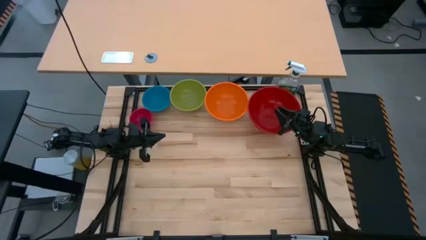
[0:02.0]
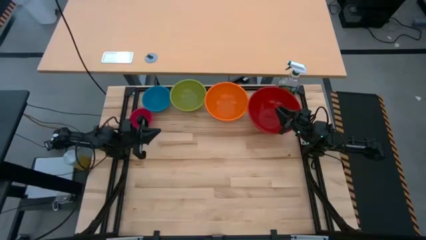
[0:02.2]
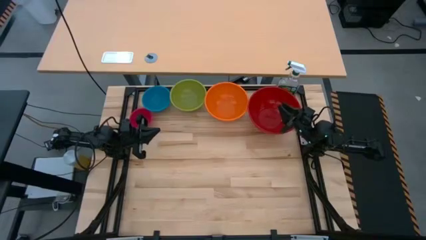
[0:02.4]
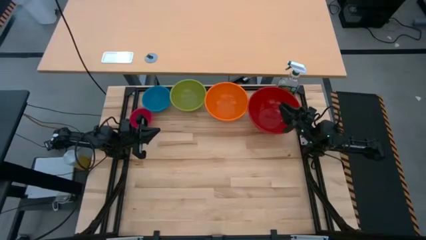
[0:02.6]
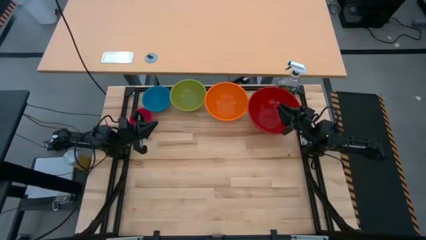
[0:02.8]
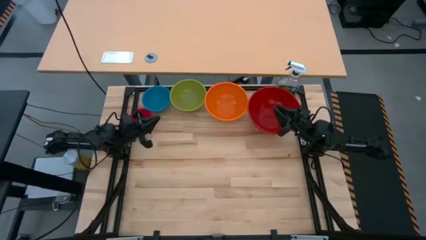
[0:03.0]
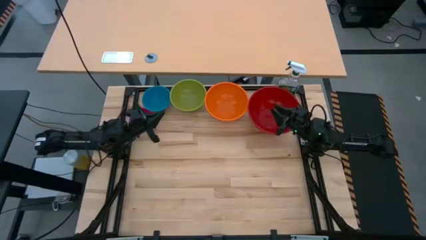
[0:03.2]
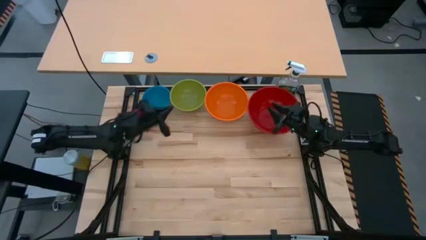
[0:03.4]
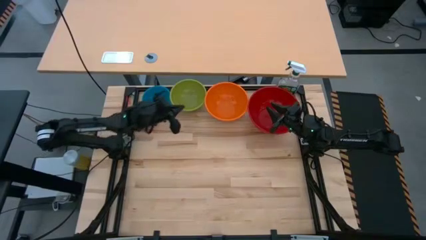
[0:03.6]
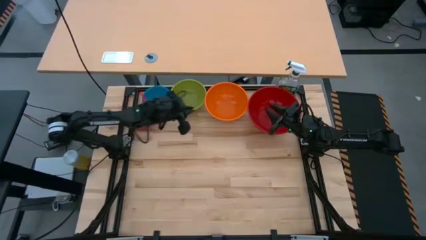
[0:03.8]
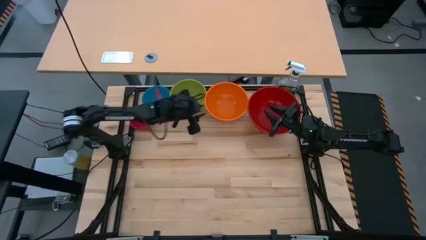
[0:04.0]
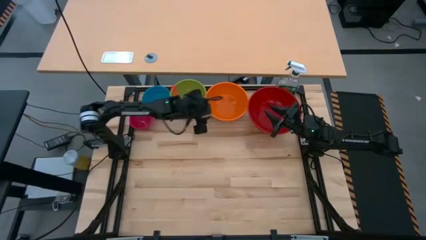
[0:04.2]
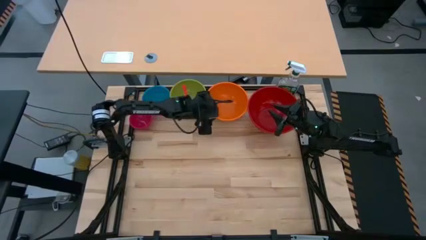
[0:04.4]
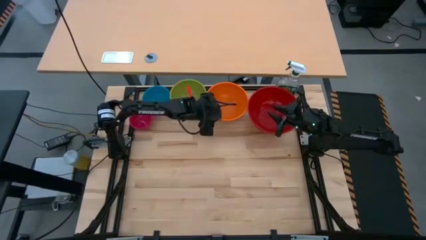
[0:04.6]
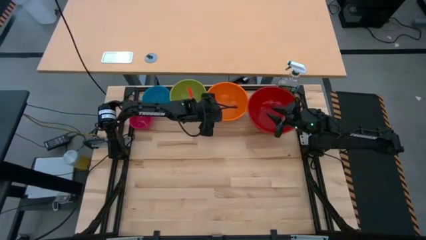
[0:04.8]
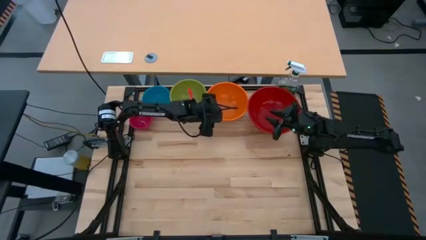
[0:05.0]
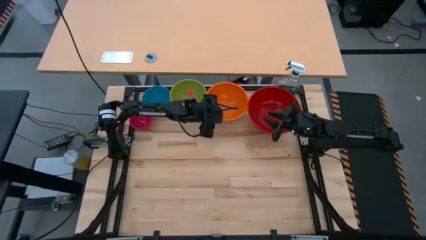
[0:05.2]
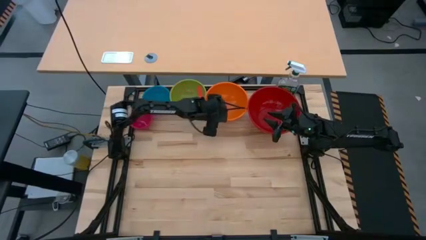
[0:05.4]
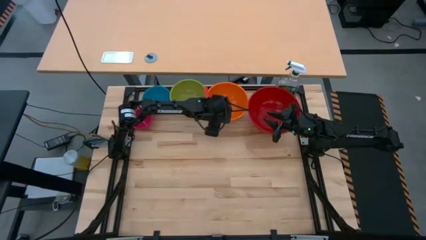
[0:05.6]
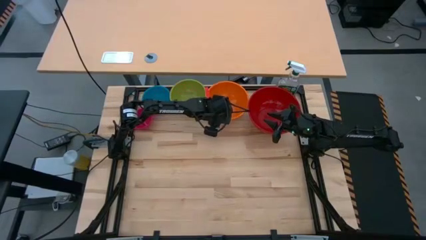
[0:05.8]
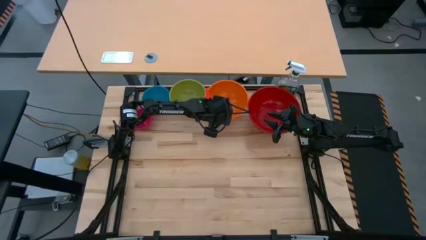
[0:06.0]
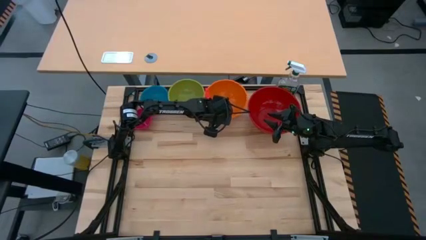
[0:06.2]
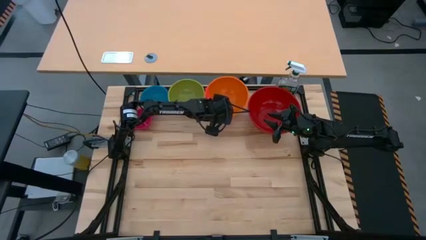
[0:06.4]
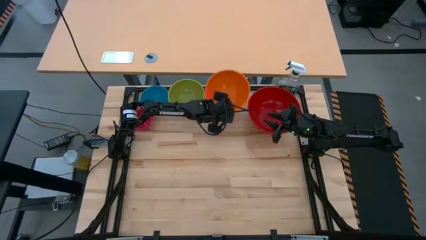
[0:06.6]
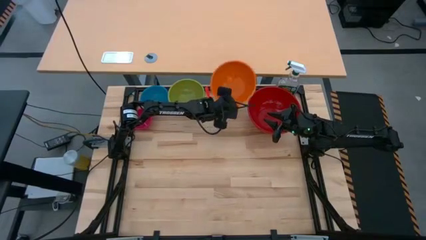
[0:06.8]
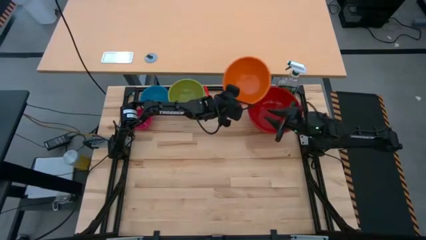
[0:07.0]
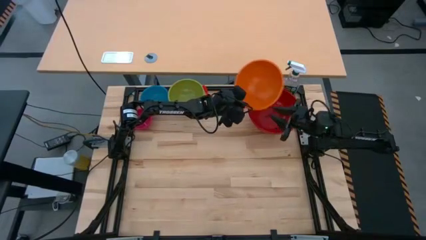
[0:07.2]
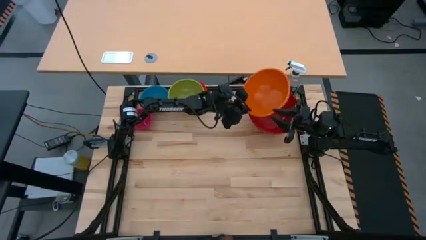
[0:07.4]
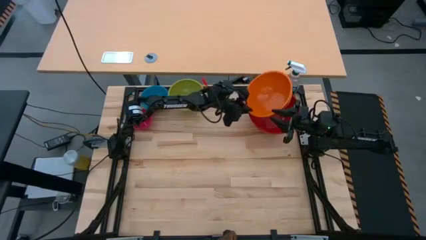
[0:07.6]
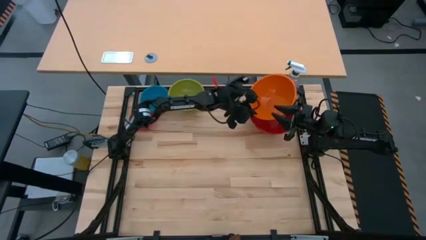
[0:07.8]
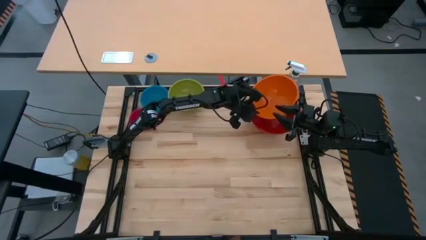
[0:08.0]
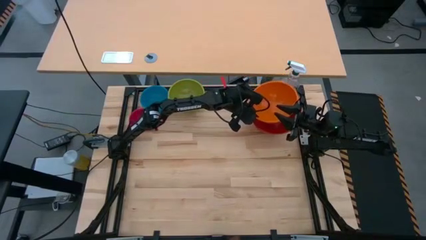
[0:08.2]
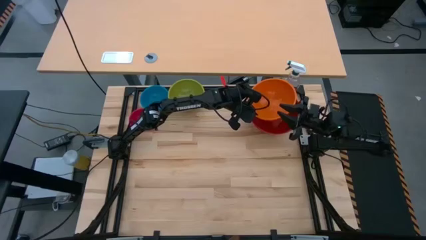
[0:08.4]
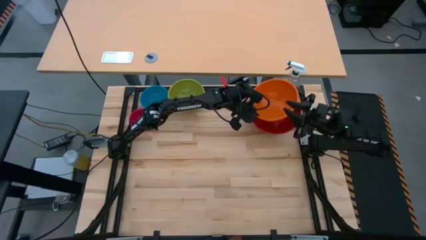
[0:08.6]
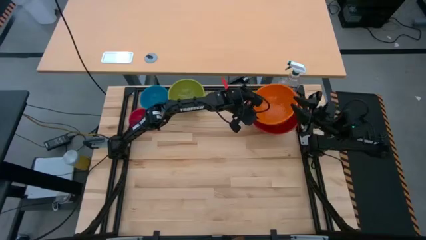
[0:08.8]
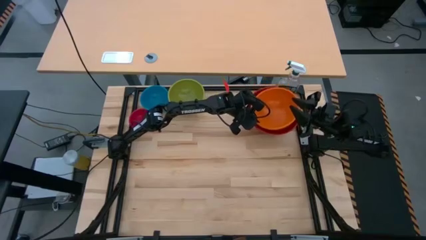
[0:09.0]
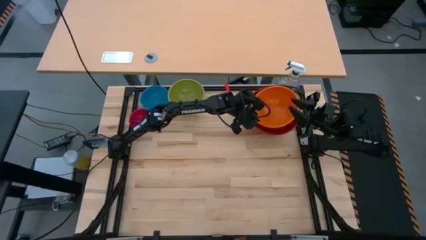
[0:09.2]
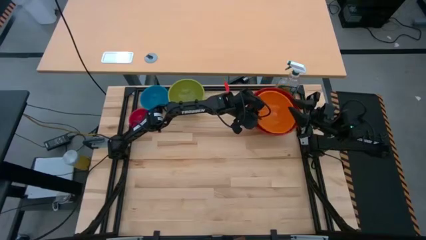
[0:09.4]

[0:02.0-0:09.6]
Stack the orange bowl into the red bowl

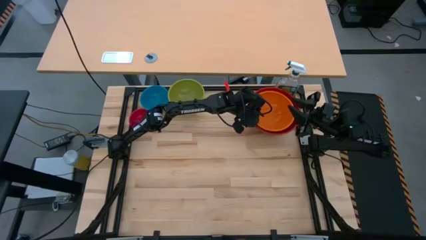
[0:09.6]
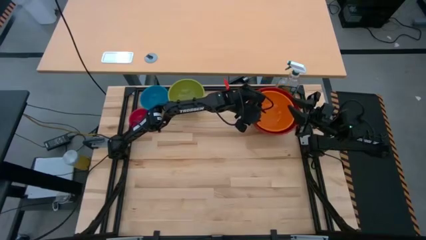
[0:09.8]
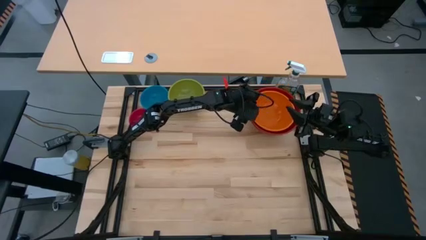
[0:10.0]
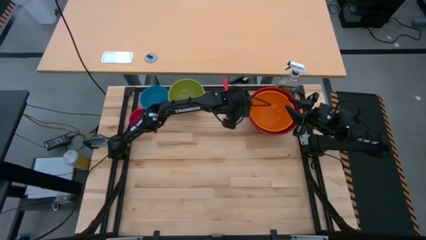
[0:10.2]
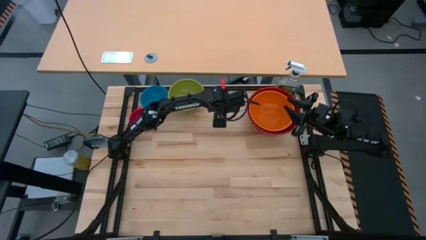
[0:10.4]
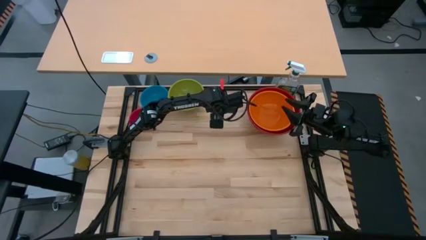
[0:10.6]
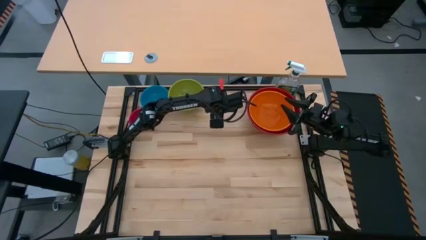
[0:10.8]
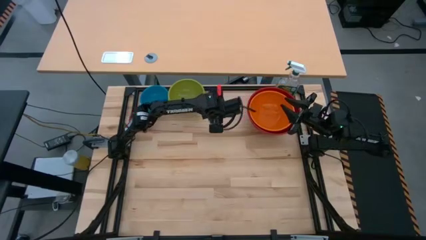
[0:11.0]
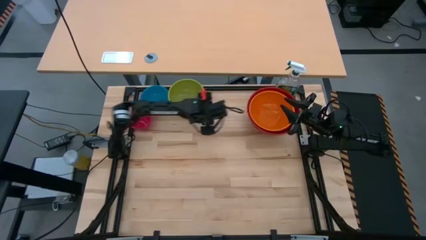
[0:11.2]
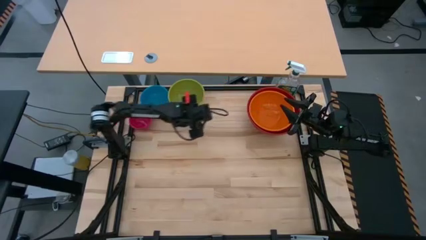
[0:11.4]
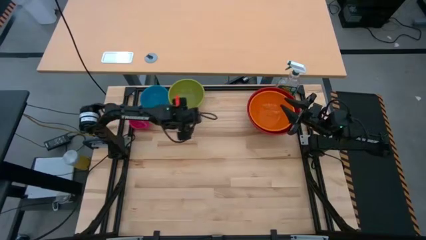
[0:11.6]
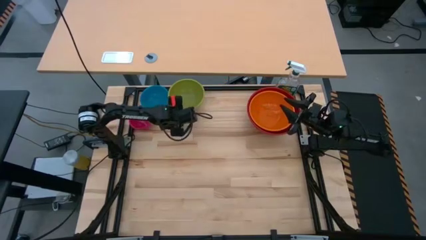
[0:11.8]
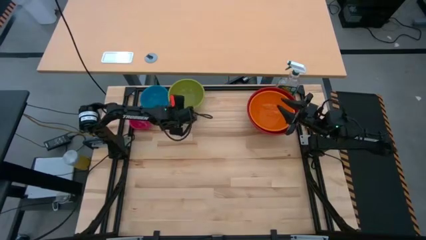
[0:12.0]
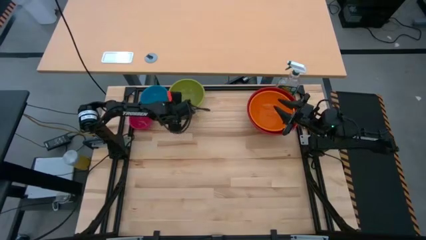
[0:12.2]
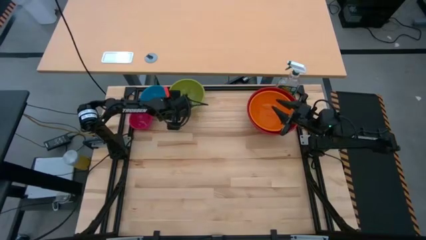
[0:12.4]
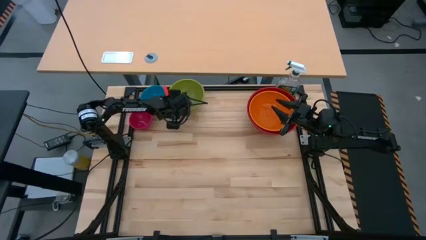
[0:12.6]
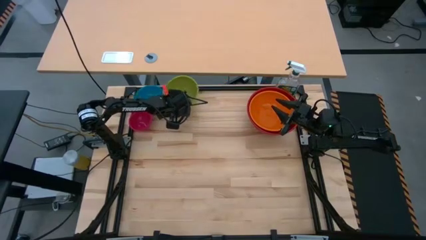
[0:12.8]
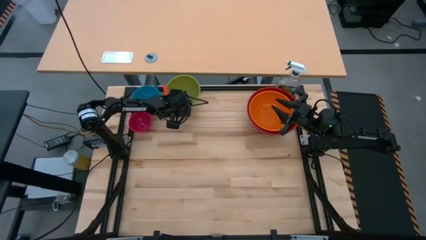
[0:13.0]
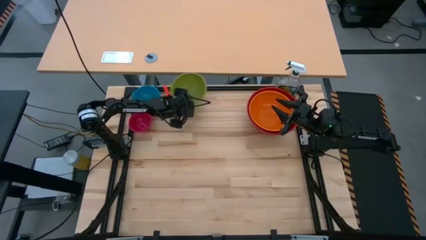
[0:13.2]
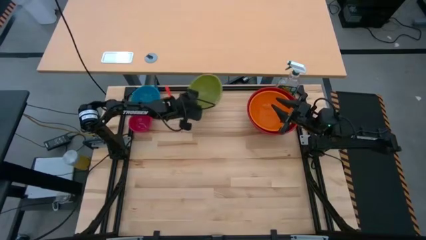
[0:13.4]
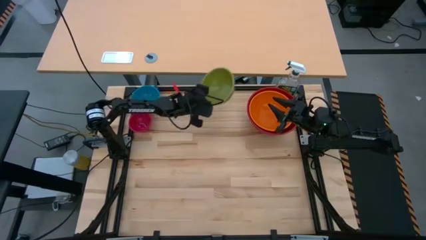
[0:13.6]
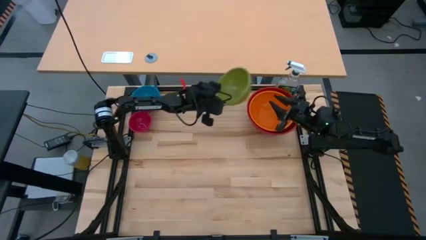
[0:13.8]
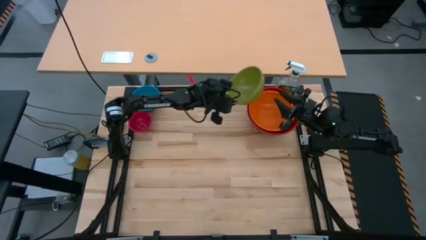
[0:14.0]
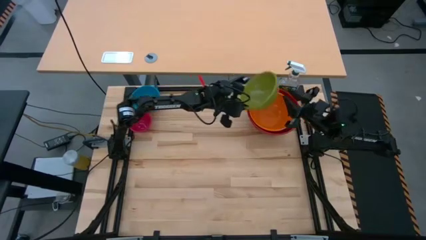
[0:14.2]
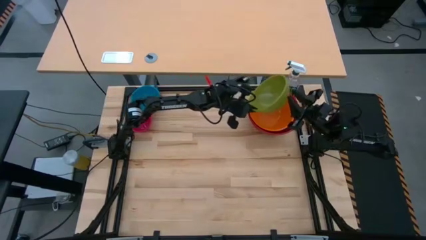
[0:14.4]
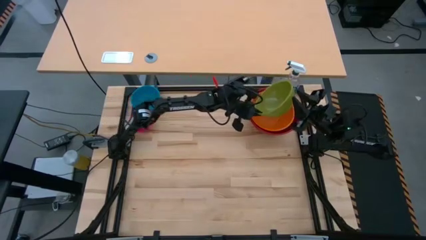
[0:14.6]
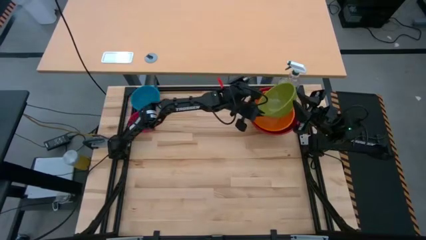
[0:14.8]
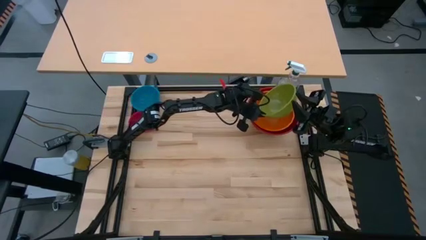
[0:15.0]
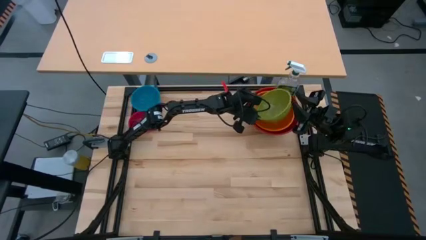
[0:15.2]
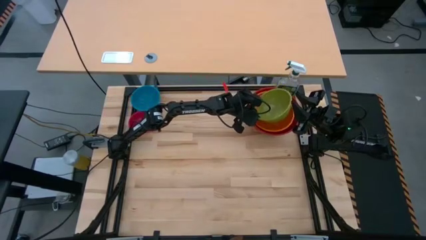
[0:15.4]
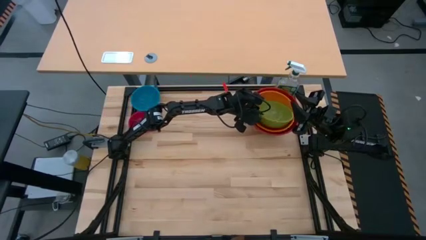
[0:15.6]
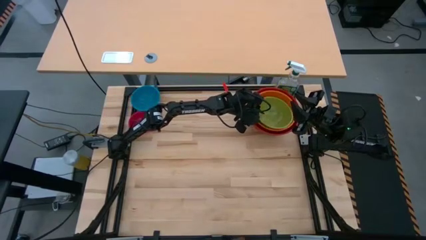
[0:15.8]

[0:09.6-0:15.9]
Stack the green bowl into the orange bowl
